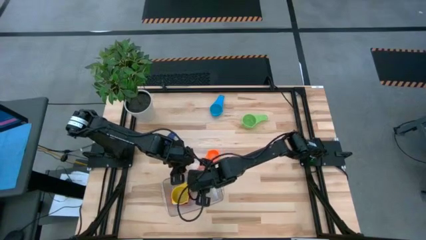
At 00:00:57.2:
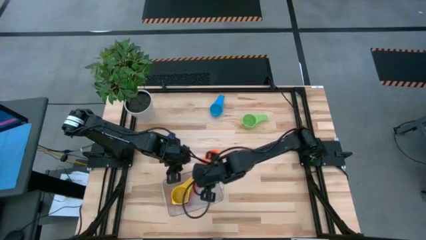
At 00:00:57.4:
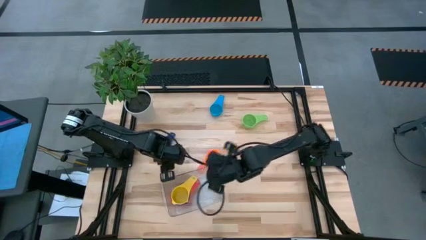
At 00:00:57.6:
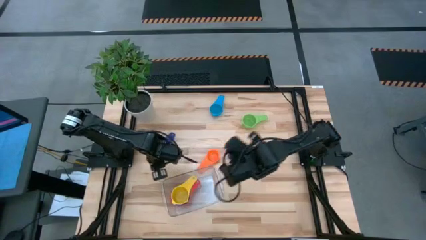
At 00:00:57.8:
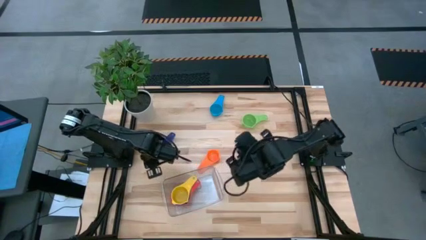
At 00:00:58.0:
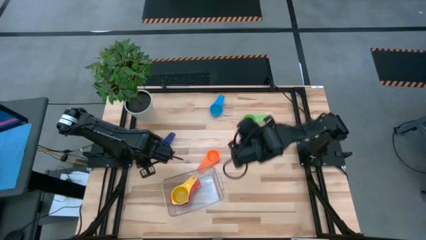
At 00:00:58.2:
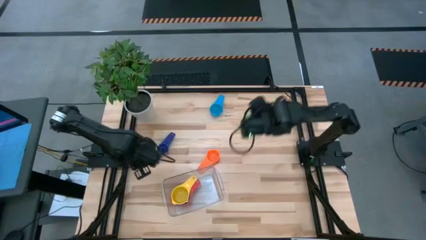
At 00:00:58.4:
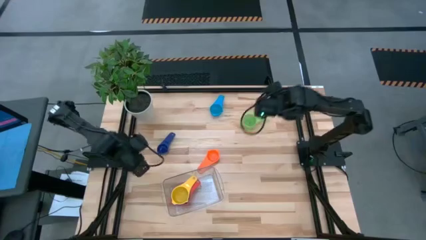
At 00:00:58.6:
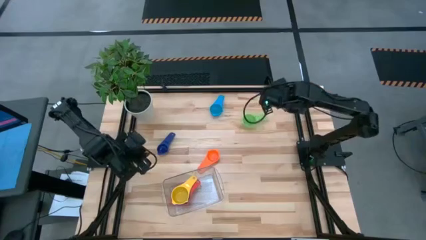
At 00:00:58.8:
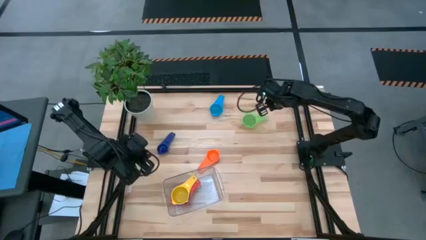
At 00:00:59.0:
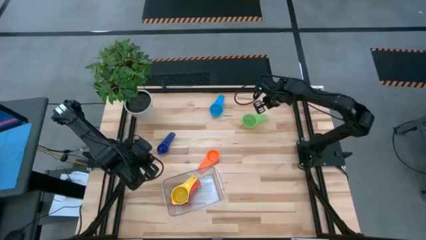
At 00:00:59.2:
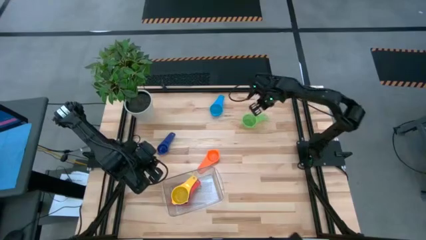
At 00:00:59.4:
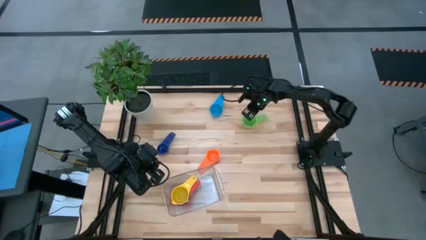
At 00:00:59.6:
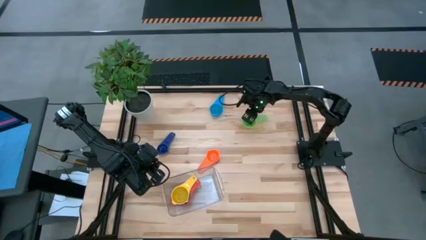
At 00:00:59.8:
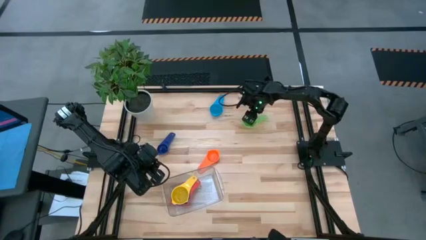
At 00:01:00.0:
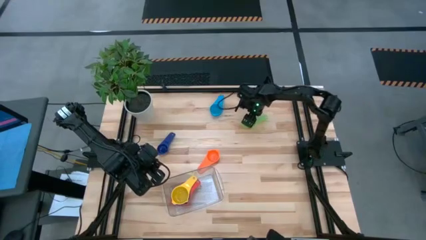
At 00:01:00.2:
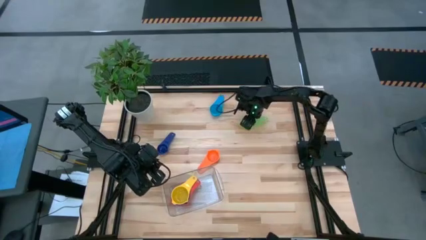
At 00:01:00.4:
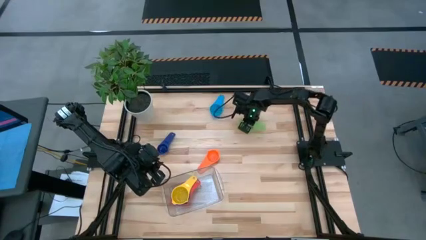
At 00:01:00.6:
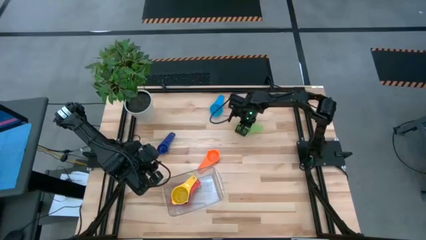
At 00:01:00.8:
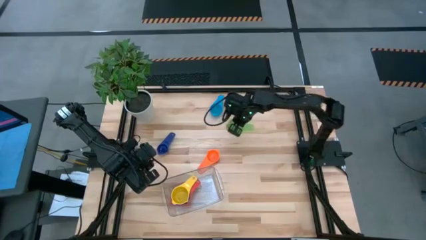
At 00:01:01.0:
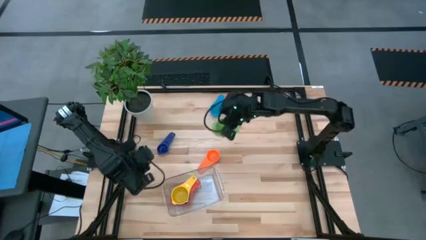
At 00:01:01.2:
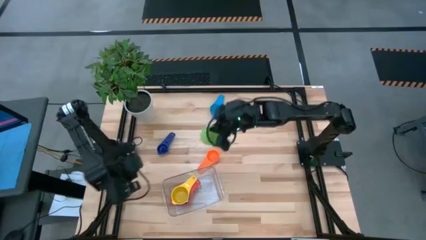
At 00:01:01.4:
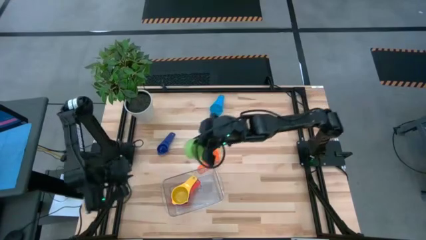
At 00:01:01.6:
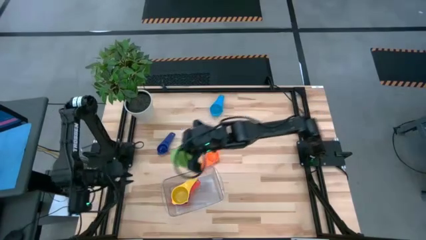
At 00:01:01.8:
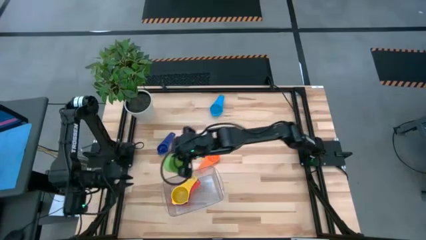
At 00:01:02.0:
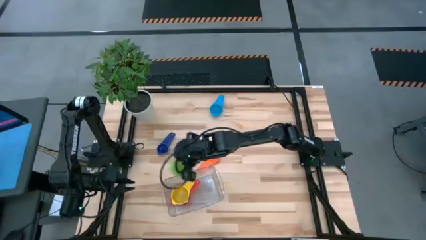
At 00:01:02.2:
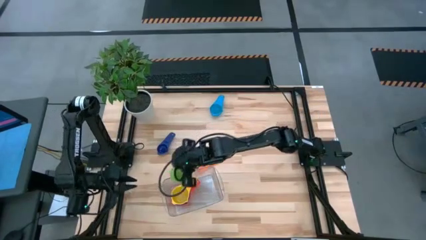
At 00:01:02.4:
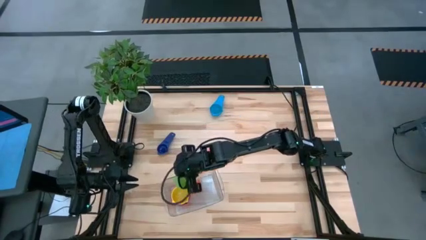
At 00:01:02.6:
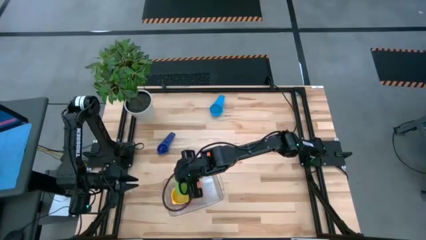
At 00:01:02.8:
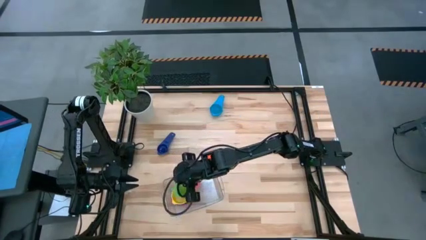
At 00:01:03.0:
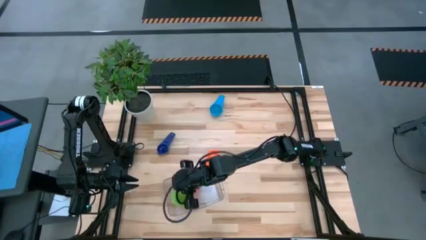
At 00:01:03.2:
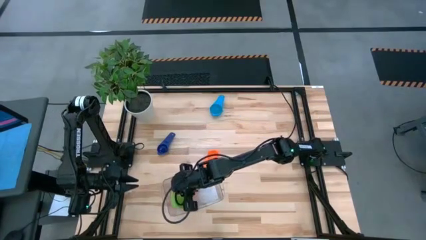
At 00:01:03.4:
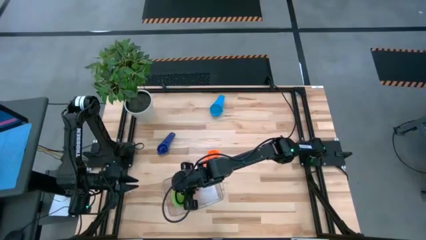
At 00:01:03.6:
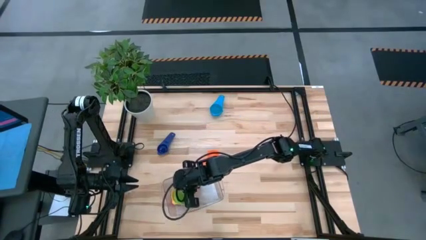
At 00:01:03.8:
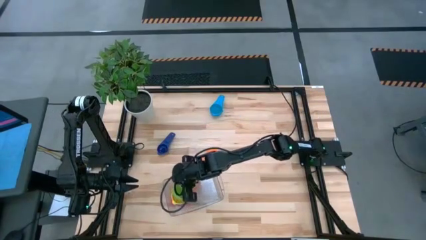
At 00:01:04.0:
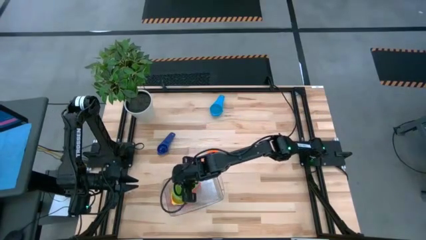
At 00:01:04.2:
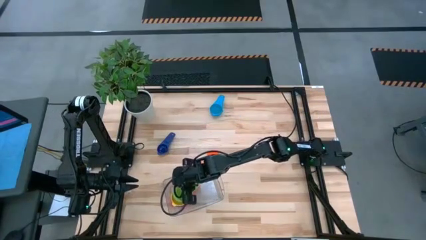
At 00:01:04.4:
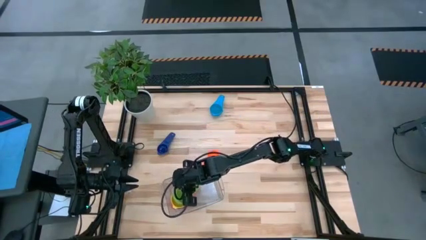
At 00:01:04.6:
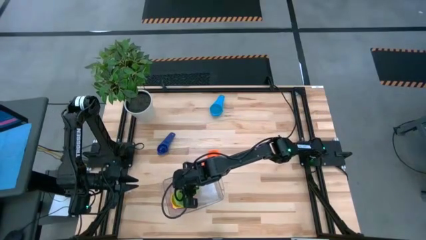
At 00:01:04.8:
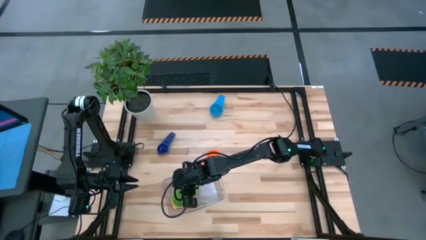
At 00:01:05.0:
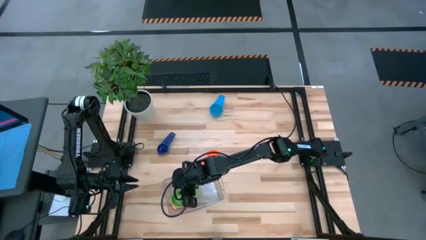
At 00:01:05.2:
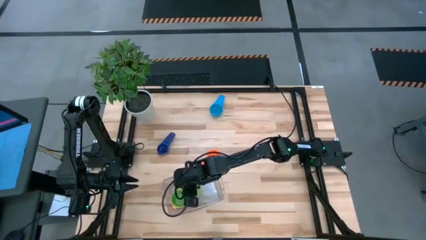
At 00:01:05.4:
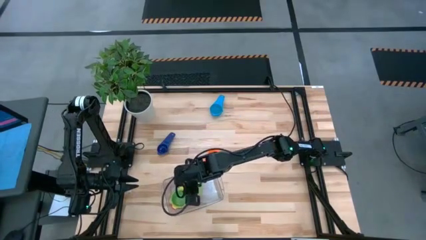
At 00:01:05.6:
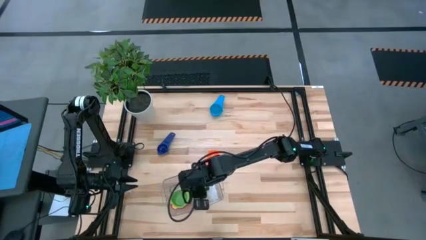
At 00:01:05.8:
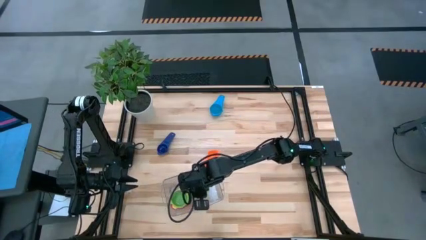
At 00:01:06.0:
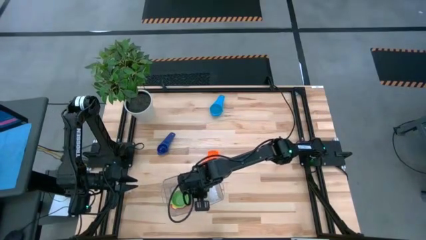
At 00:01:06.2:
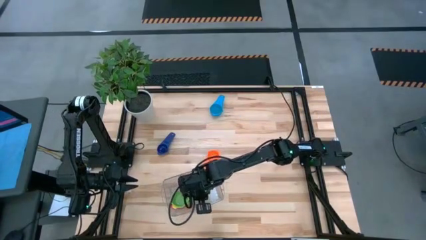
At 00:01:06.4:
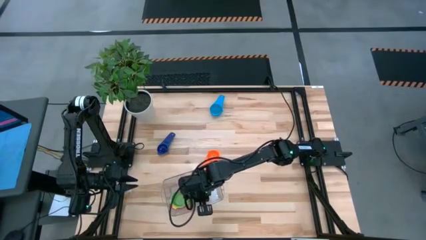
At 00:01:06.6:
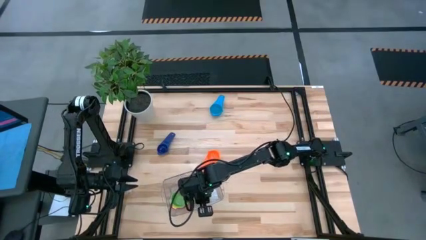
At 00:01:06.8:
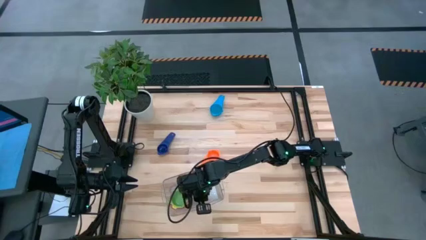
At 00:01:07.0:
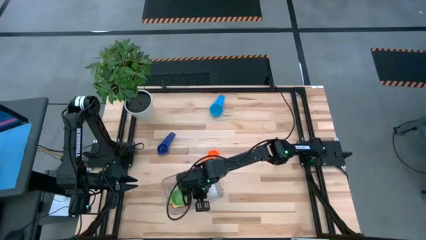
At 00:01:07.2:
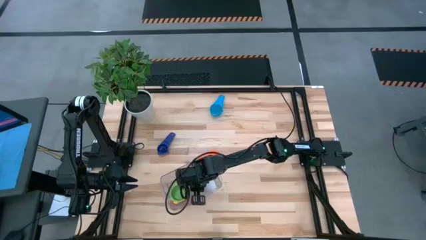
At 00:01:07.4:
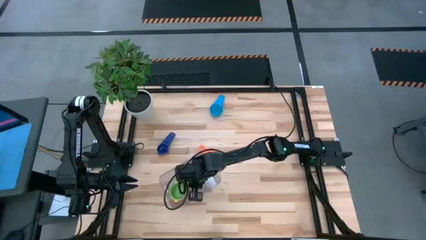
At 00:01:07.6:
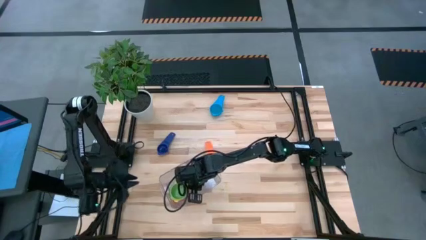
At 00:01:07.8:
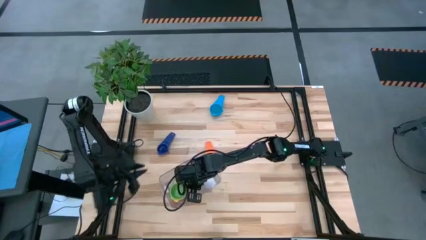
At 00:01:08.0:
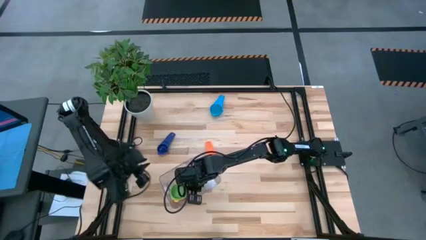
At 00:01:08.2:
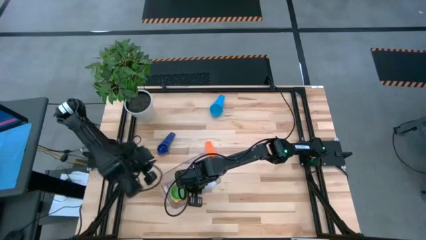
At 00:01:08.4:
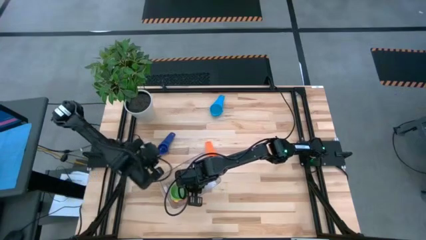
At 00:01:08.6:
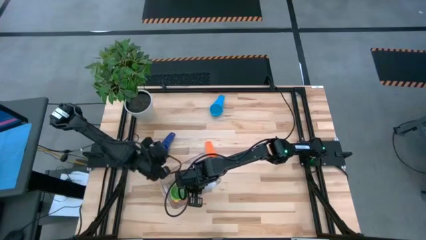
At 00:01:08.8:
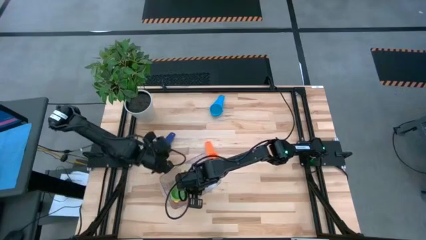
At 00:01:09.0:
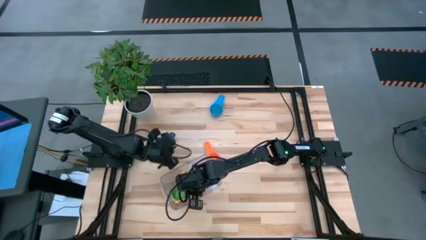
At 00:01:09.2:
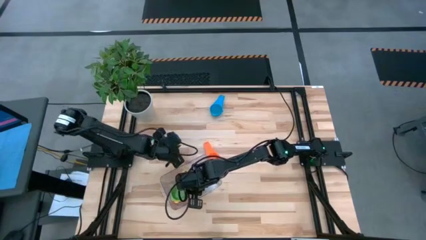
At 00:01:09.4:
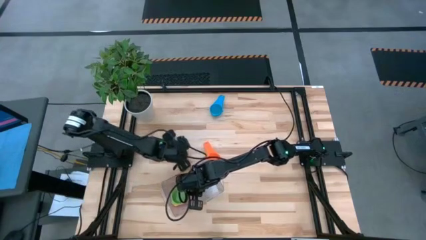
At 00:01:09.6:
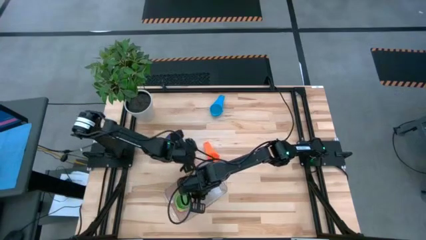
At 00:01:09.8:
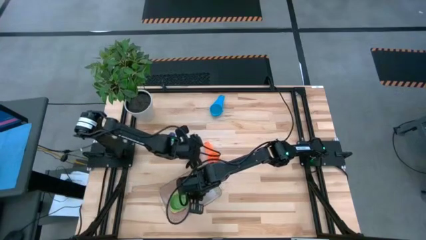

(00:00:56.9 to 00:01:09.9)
Task: Nest measuring cups in basket
Stack the green measuring cup on top of the yellow measuring cup into the transparent bin

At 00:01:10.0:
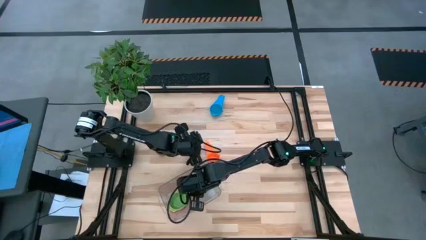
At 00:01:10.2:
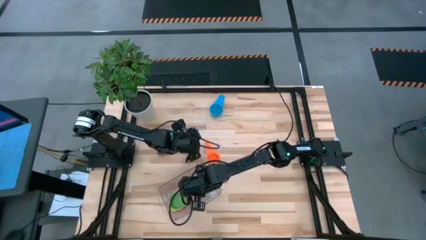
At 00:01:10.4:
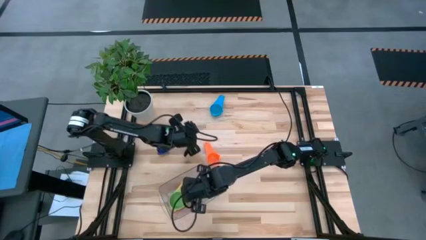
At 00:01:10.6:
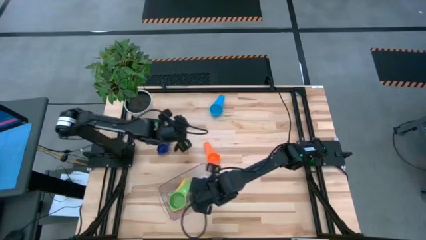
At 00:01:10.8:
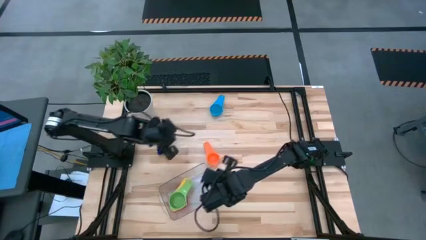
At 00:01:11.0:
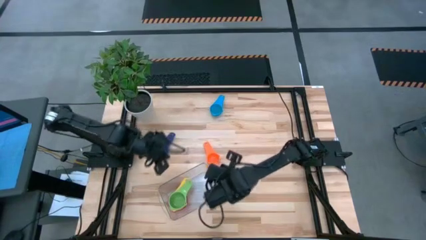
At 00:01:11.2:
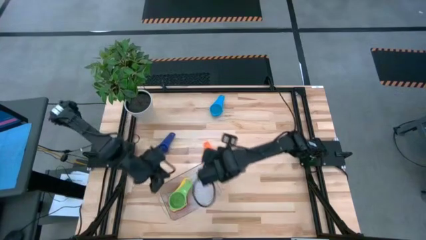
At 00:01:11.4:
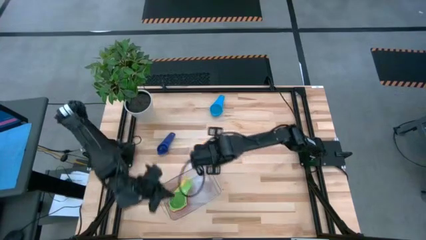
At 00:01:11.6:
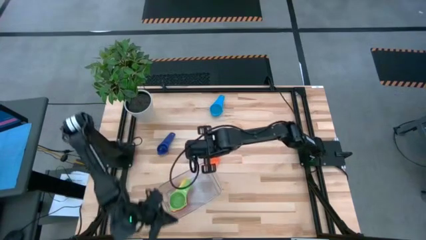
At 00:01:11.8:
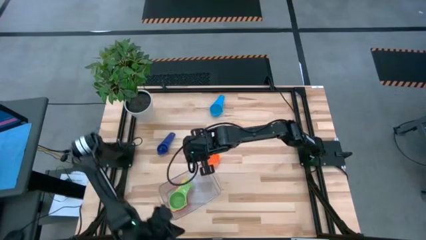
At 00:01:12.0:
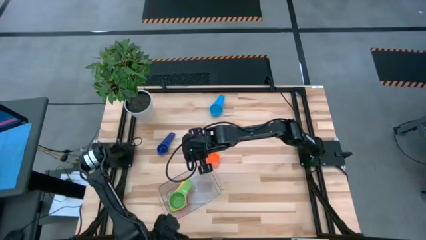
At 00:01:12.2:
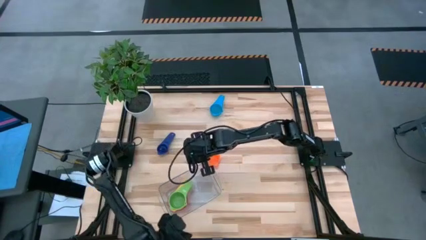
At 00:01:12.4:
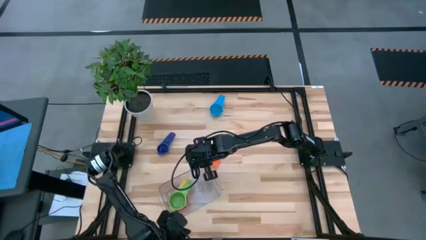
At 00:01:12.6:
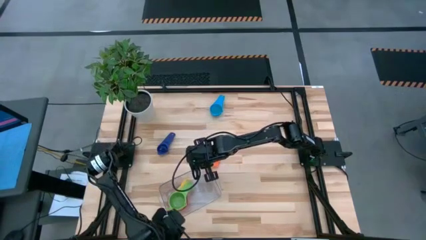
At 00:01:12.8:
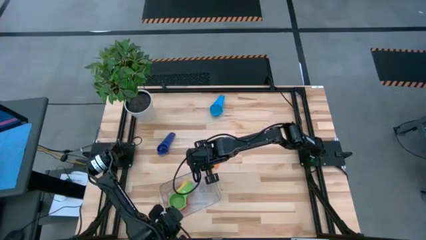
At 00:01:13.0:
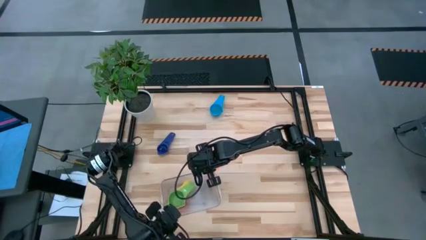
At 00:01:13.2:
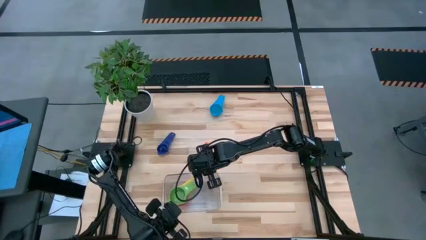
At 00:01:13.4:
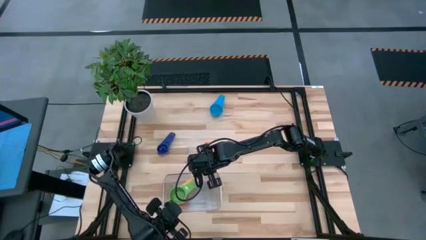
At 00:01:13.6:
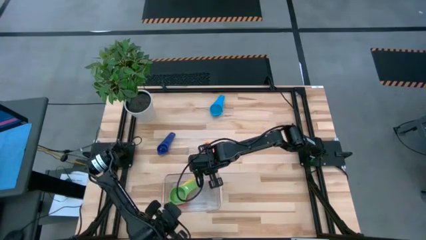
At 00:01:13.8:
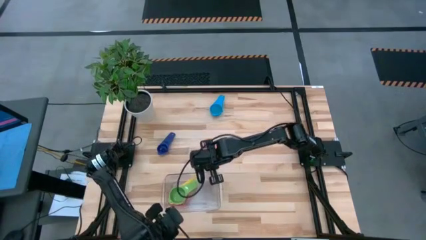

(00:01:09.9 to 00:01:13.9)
Adjust the transparent bin

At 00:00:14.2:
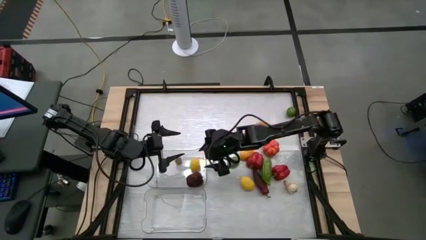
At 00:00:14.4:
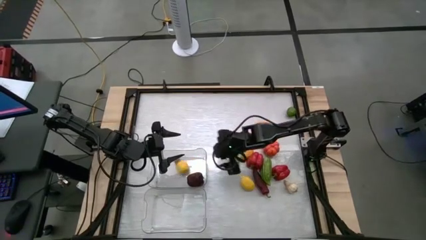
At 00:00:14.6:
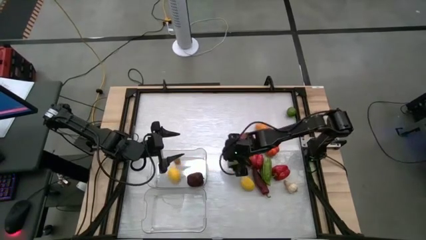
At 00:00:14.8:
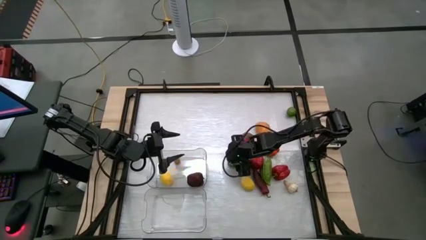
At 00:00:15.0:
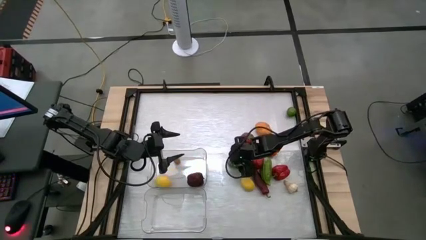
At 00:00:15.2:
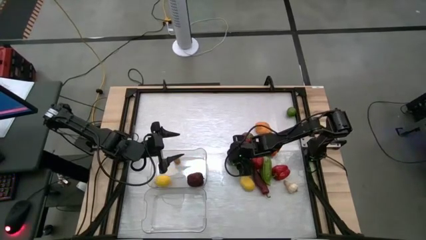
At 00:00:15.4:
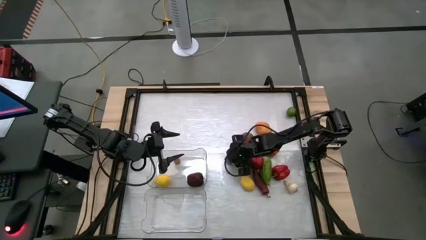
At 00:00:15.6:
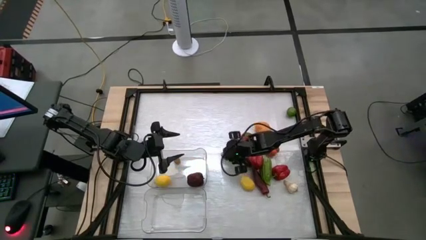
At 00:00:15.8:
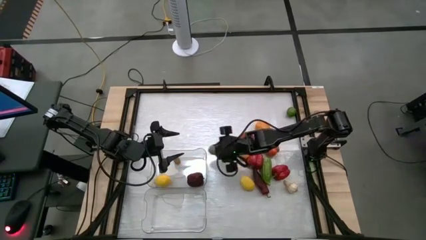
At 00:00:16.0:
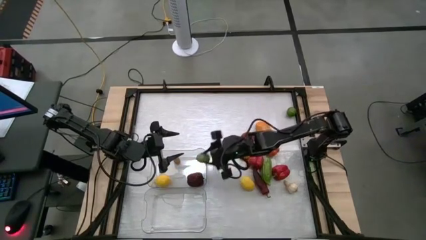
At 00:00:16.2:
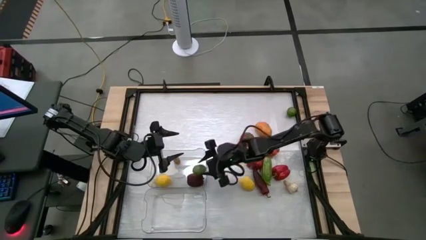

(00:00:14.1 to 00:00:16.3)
Task: Sort produce into baskets
Put the green lemon into the top transparent bin
